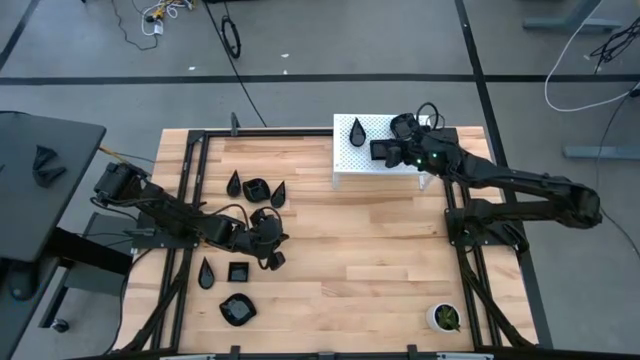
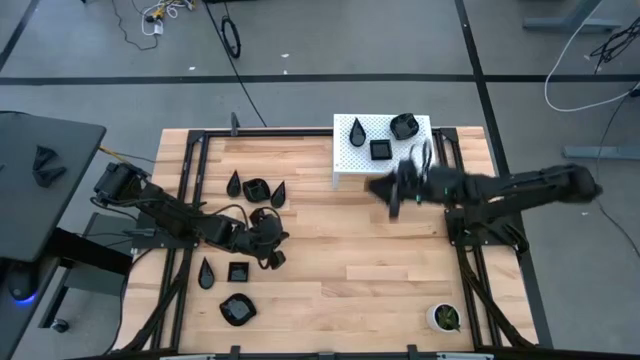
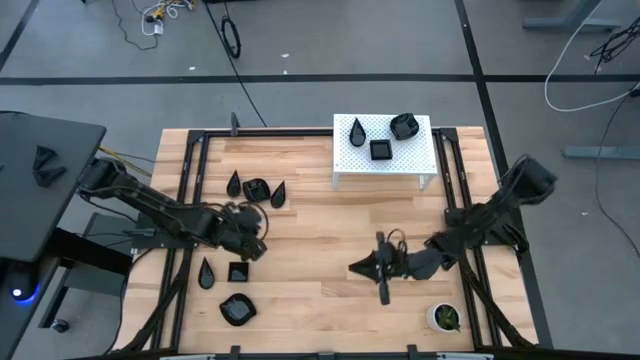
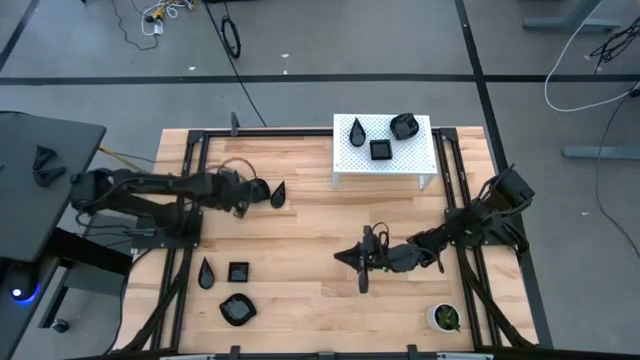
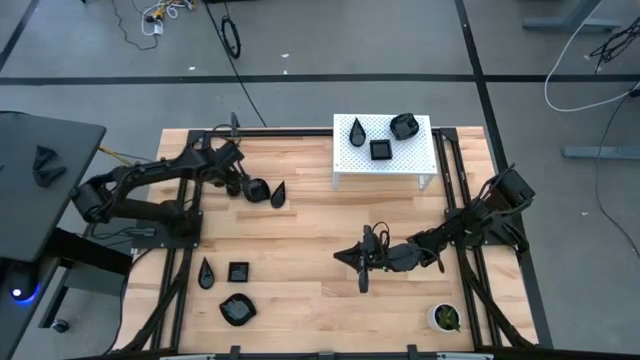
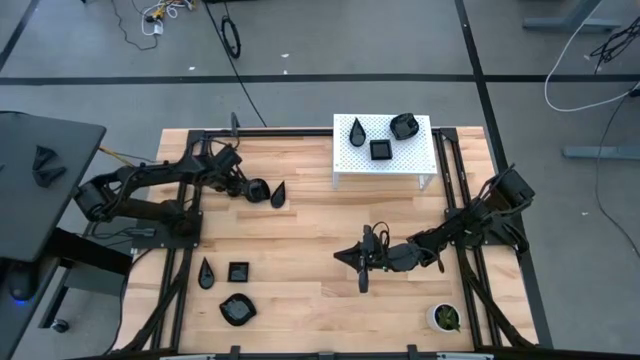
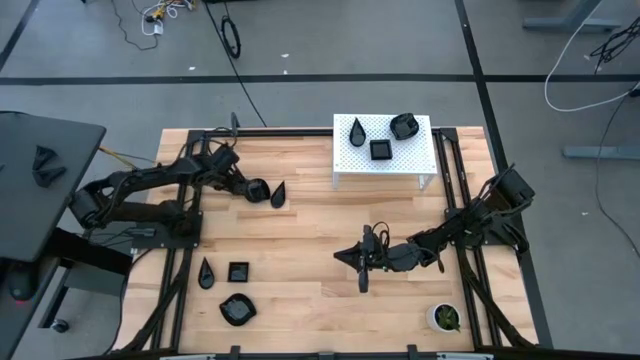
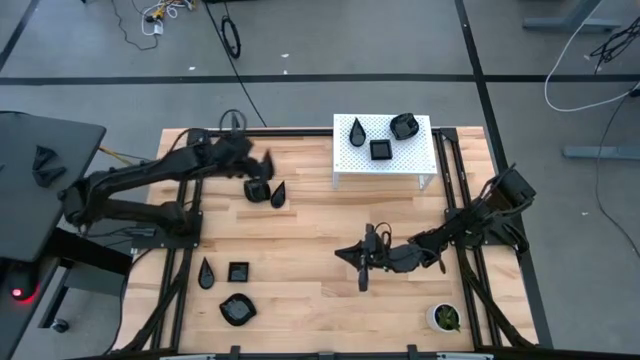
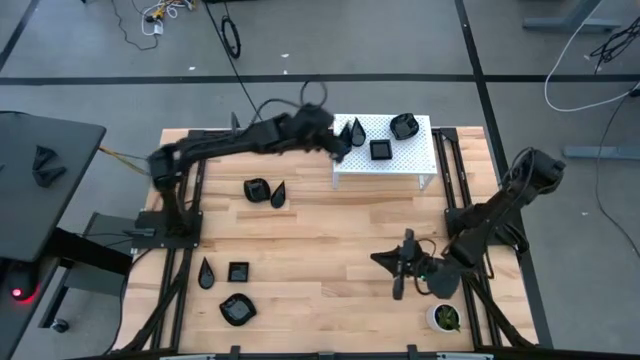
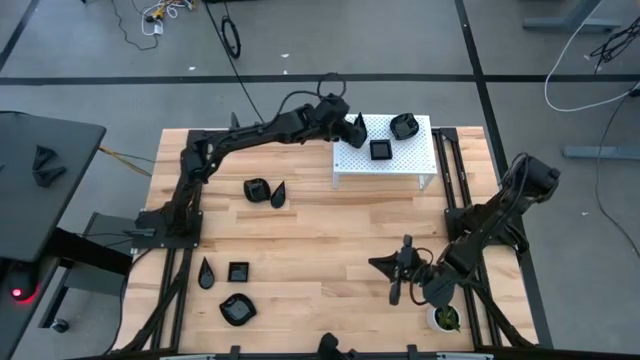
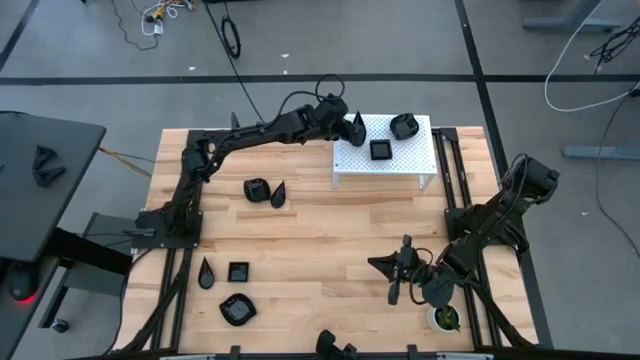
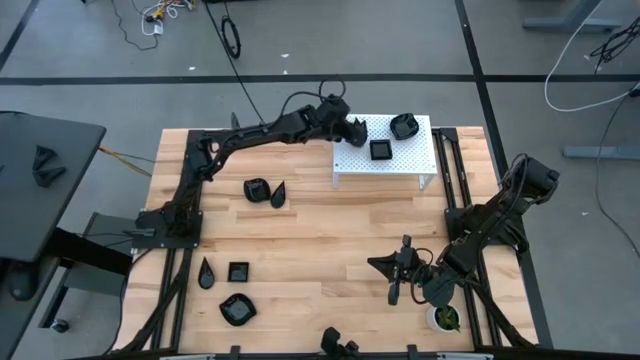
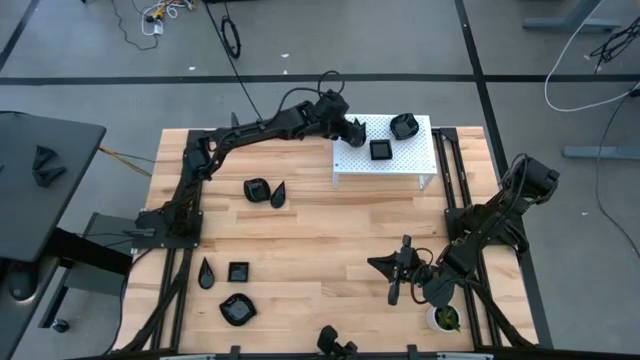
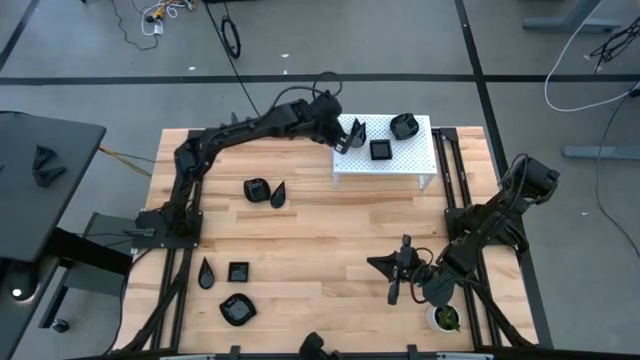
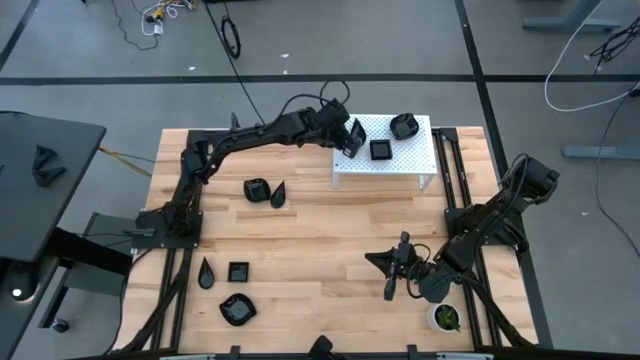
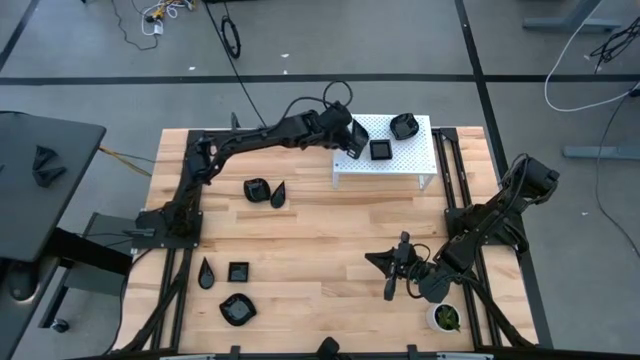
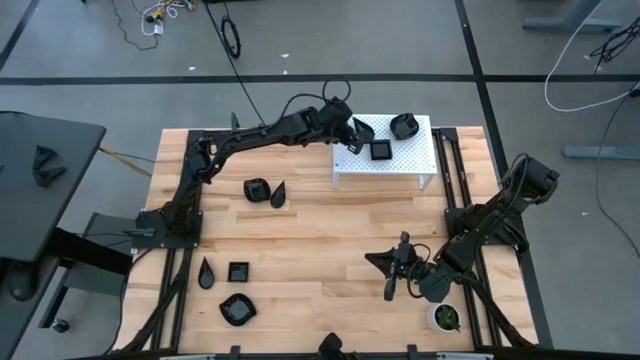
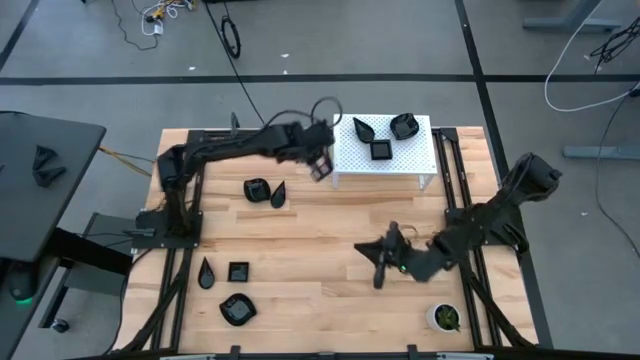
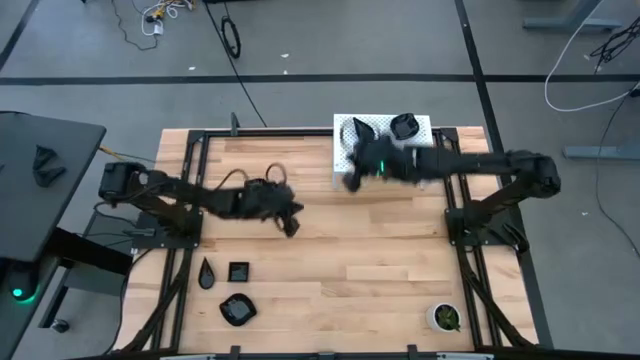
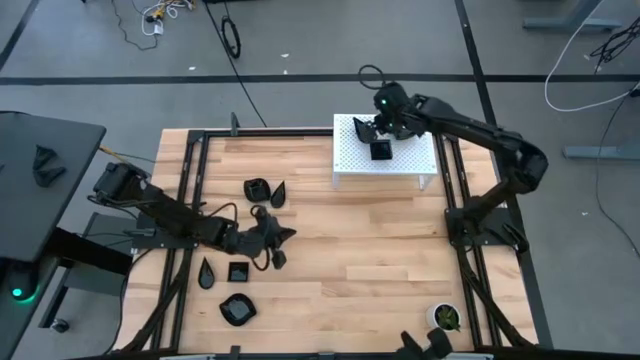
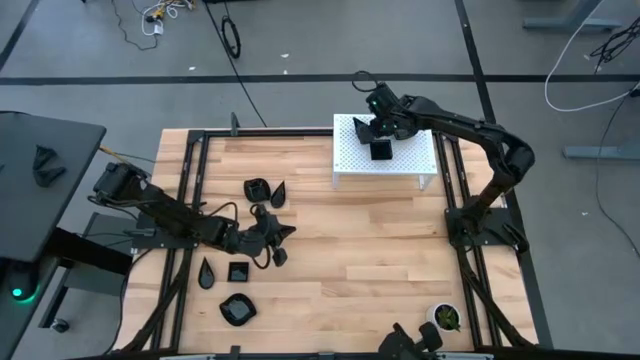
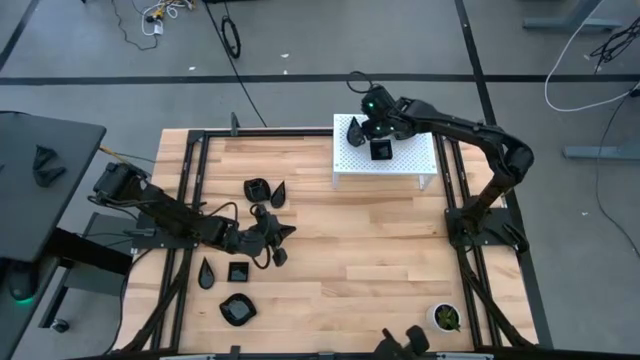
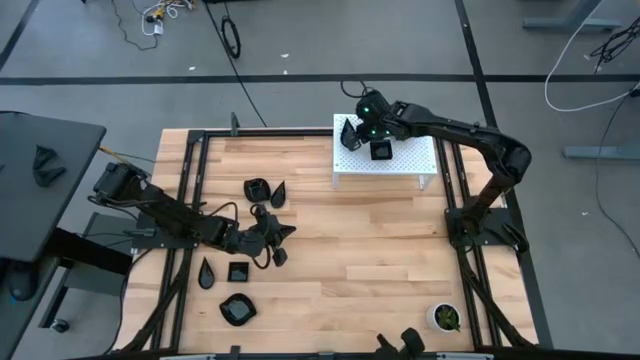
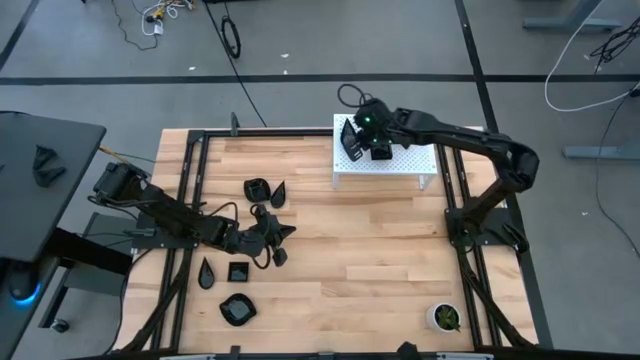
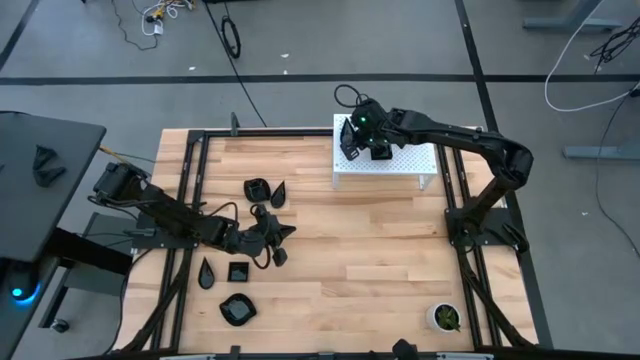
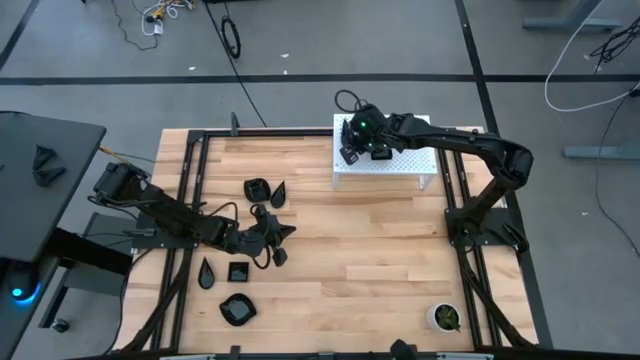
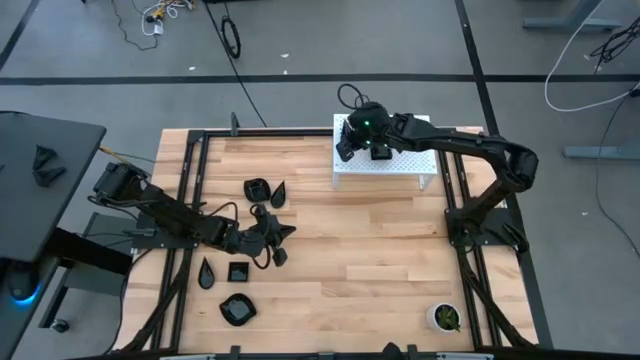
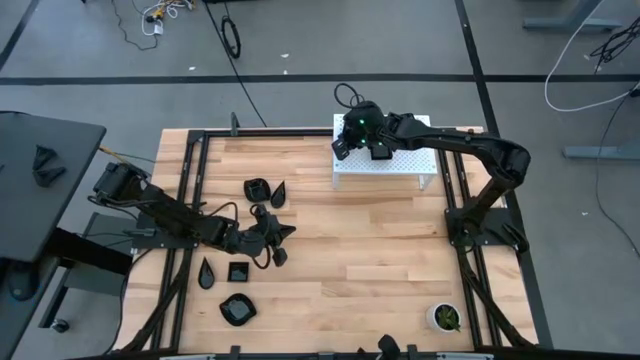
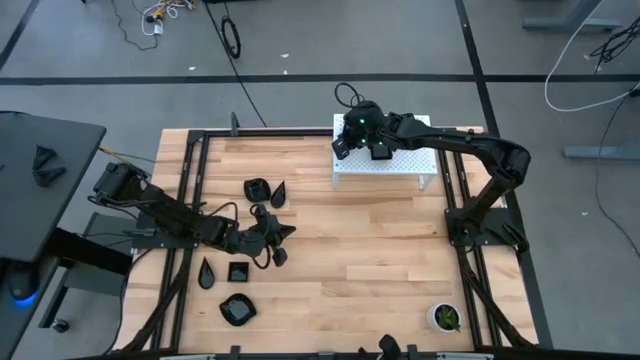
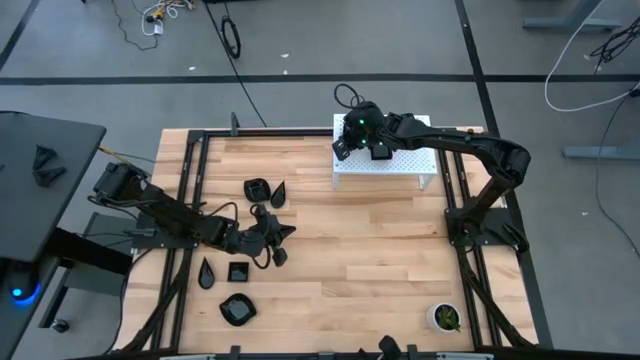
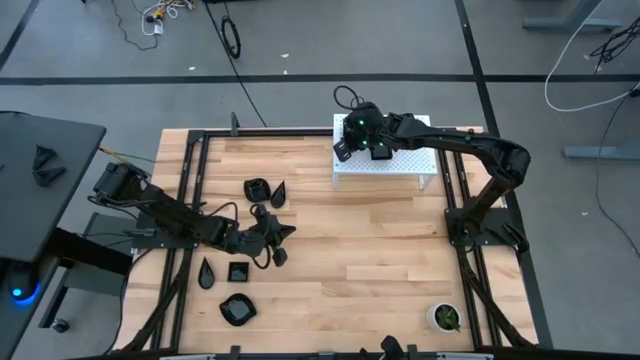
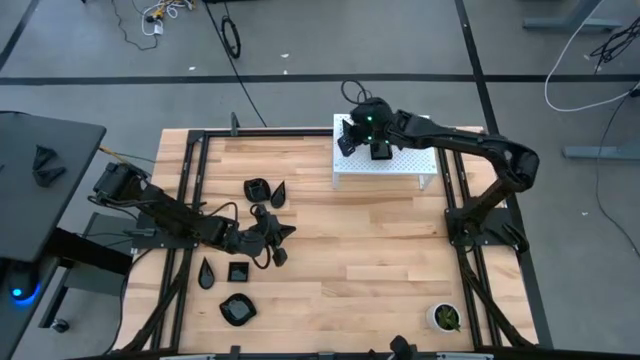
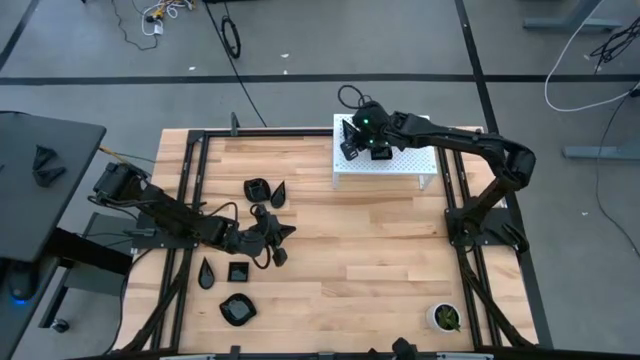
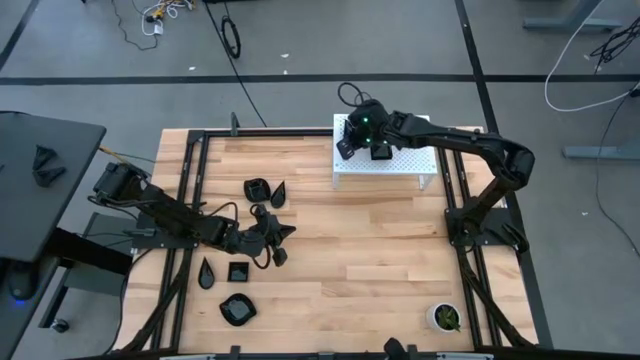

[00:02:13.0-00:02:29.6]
Task: Pick & Place Mini shaped plates
Stack the black drop shaped plate on the black drop shaped plate on the shelf
